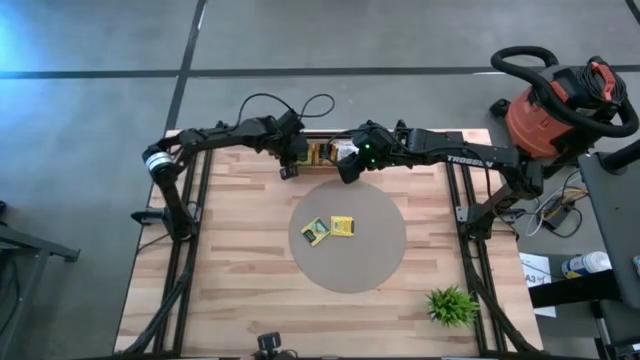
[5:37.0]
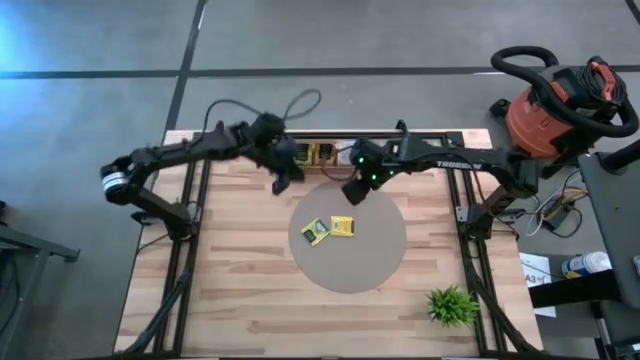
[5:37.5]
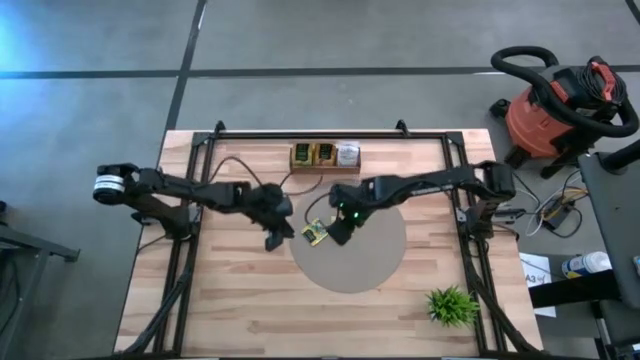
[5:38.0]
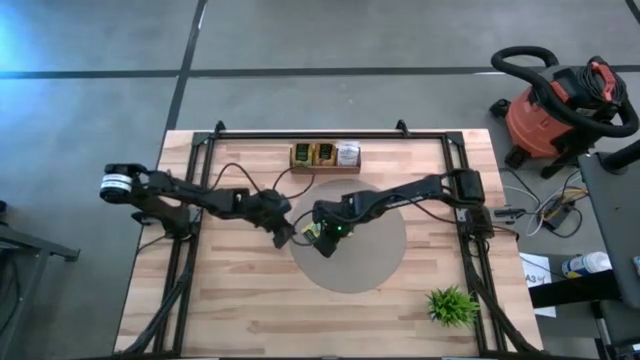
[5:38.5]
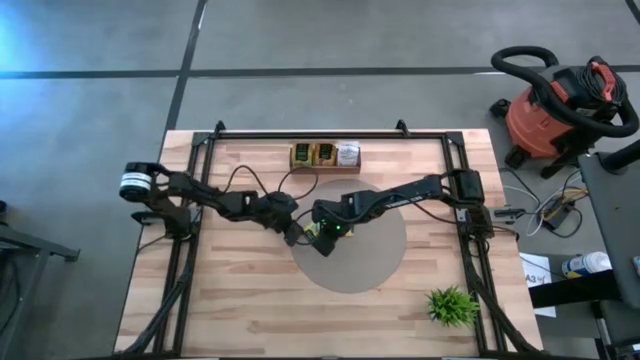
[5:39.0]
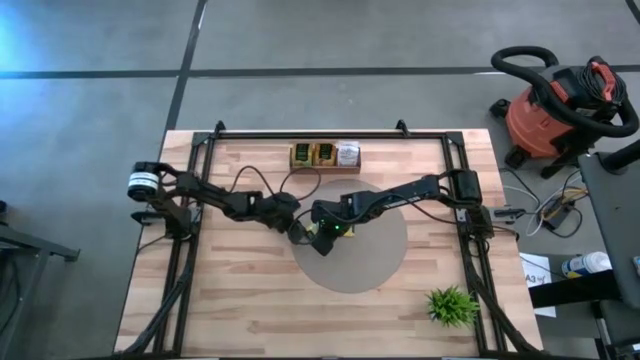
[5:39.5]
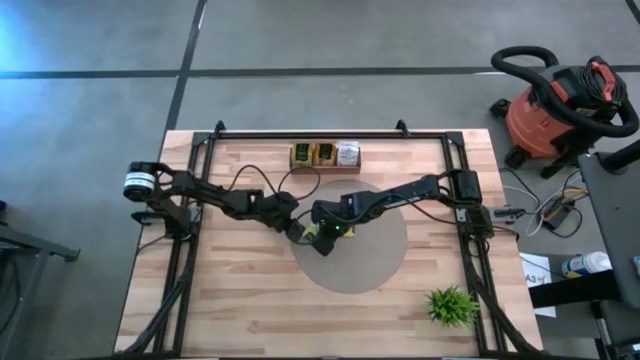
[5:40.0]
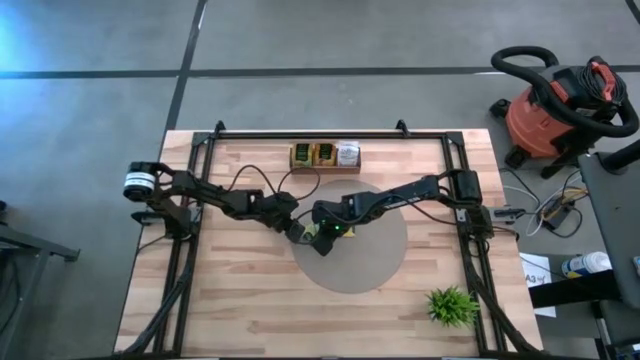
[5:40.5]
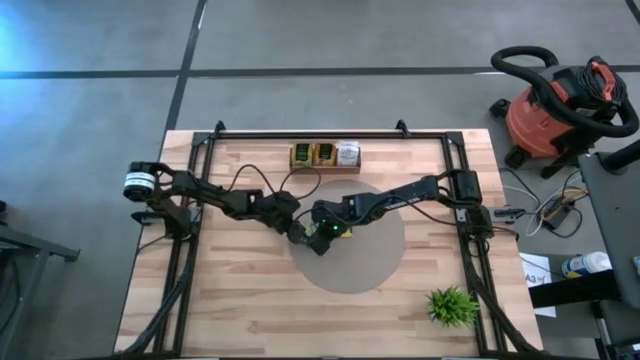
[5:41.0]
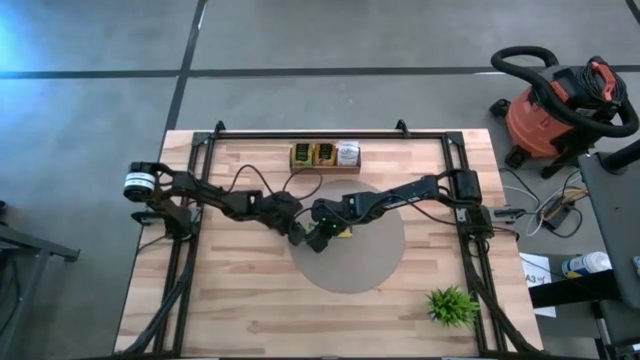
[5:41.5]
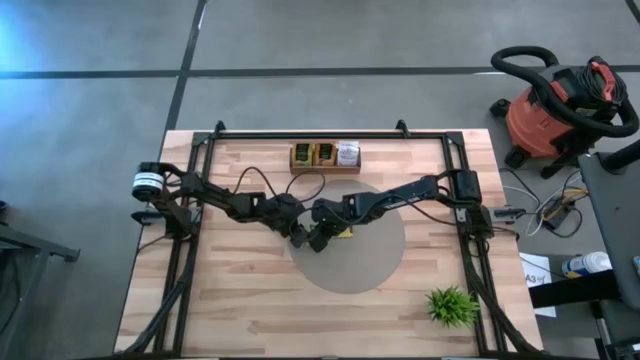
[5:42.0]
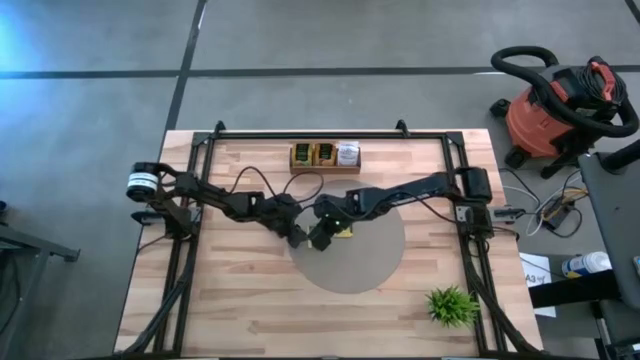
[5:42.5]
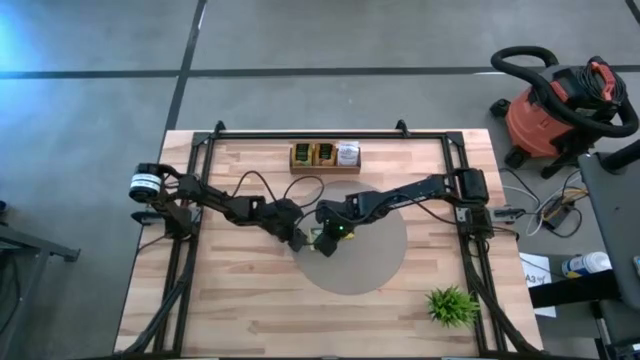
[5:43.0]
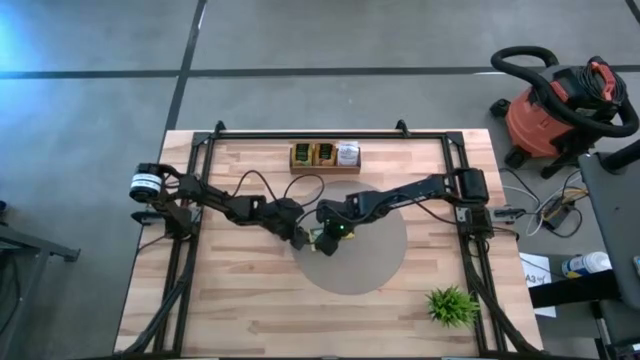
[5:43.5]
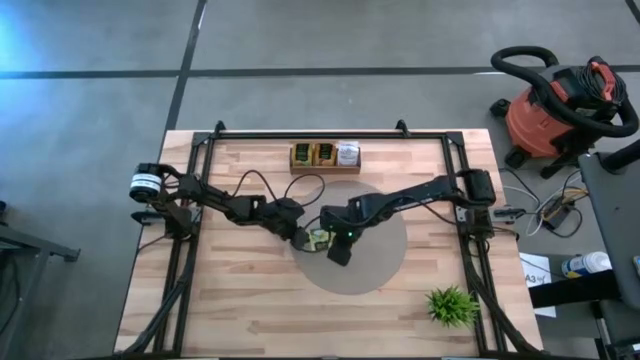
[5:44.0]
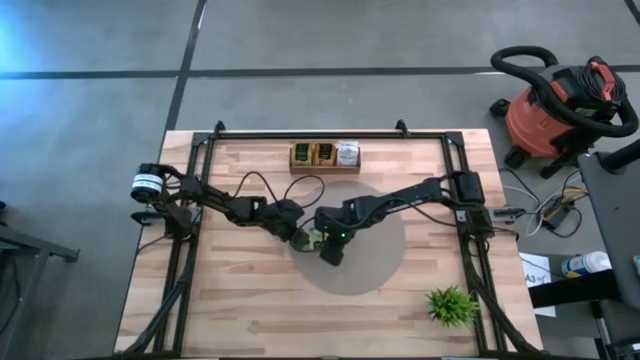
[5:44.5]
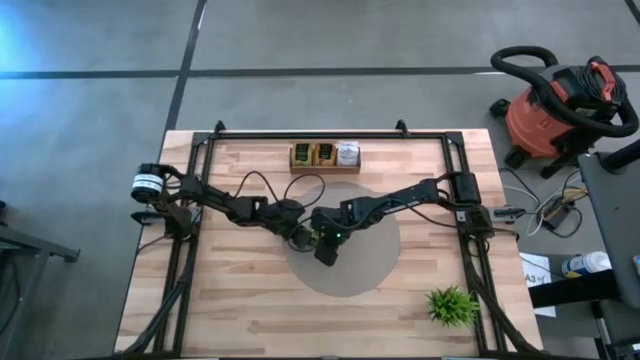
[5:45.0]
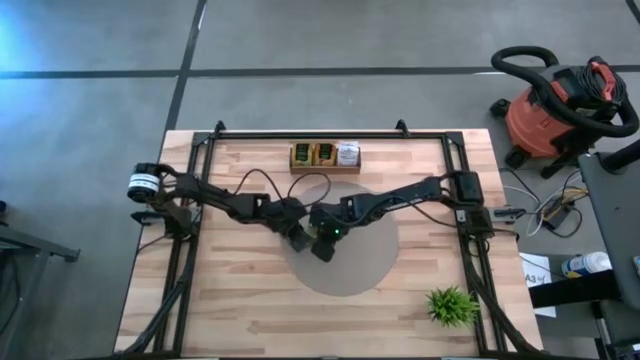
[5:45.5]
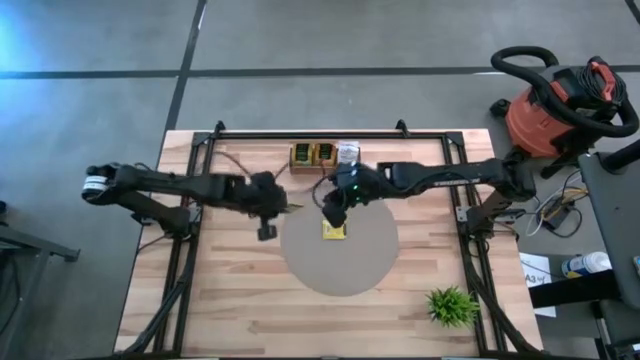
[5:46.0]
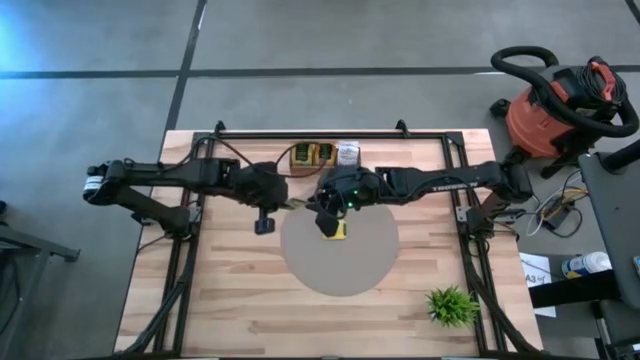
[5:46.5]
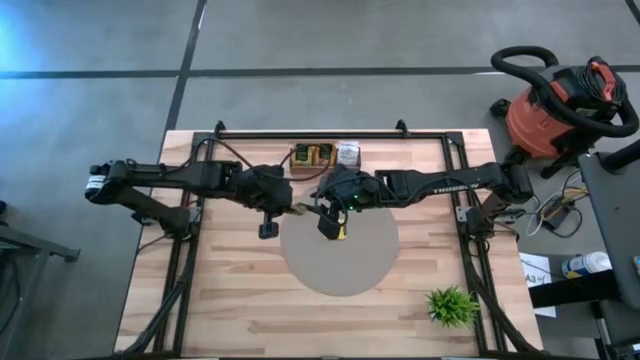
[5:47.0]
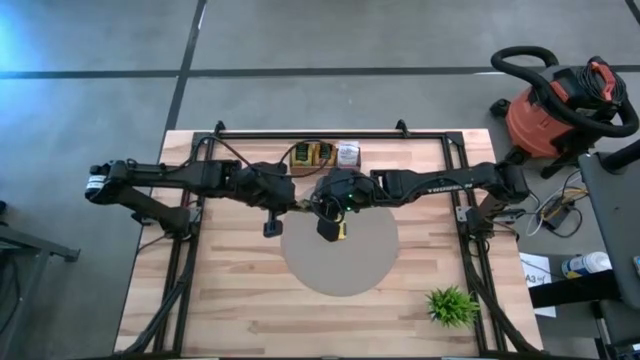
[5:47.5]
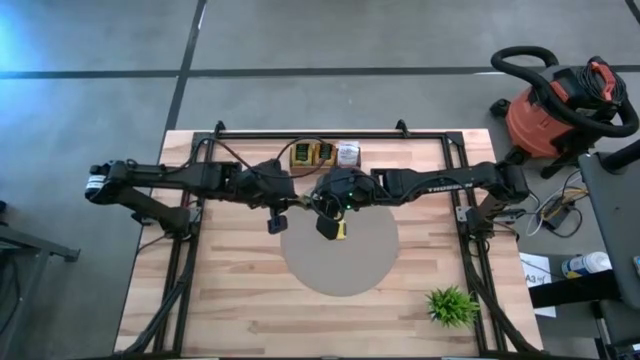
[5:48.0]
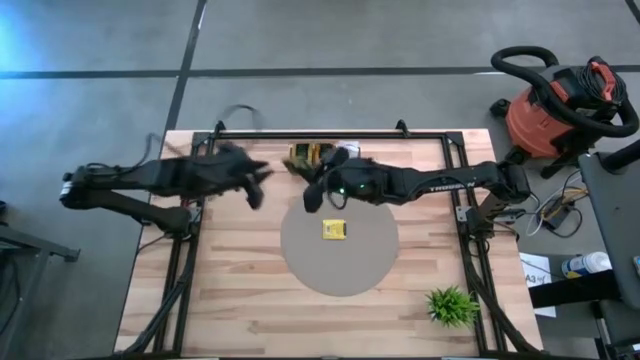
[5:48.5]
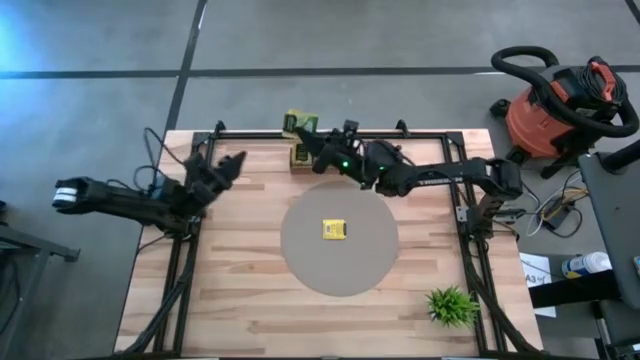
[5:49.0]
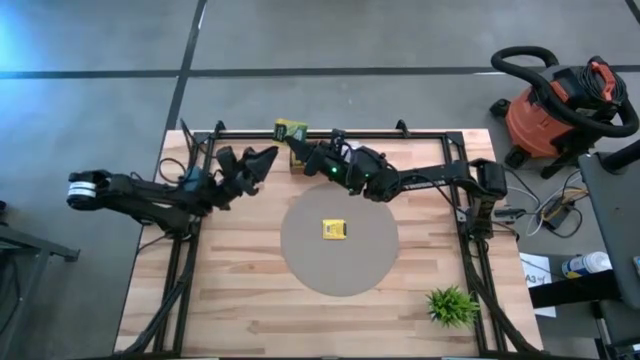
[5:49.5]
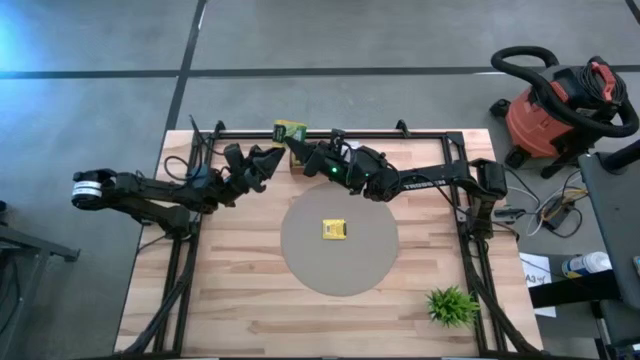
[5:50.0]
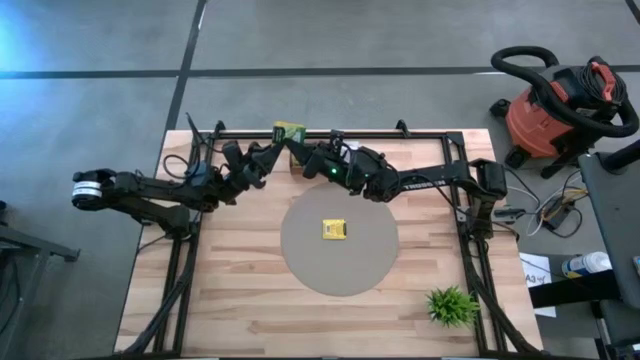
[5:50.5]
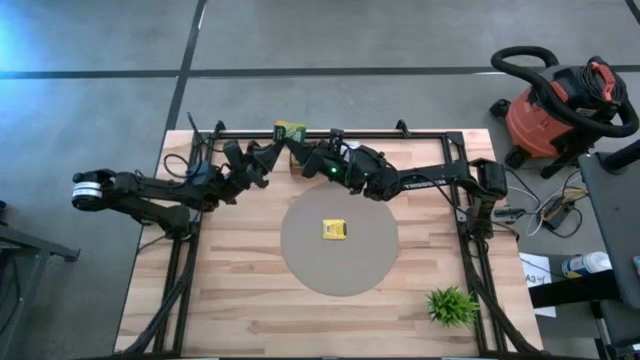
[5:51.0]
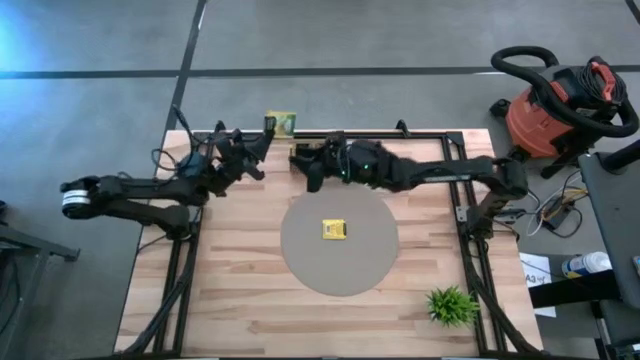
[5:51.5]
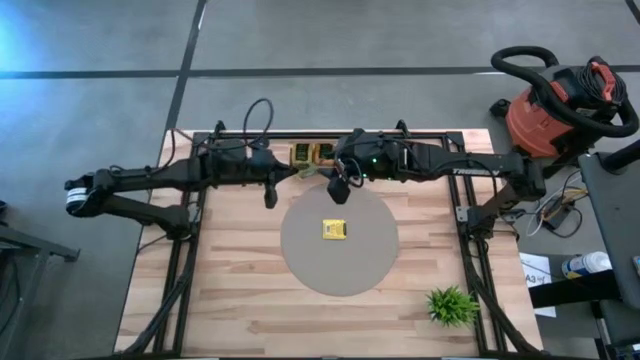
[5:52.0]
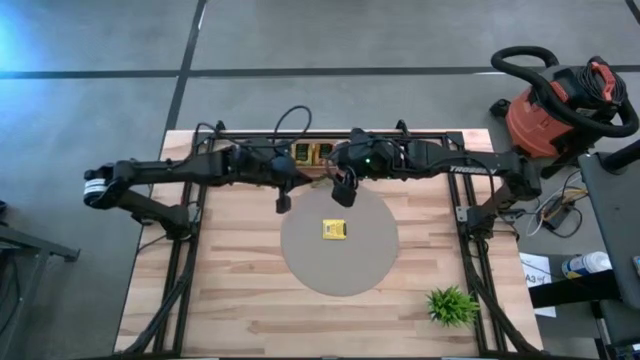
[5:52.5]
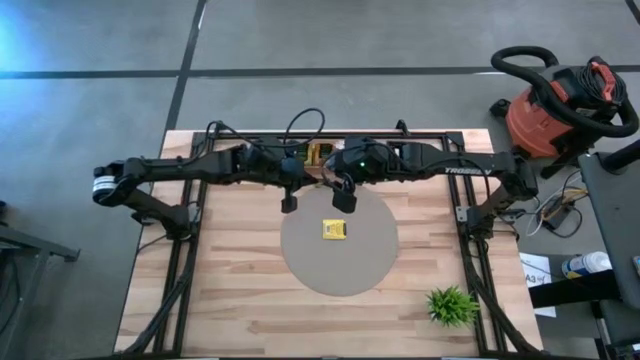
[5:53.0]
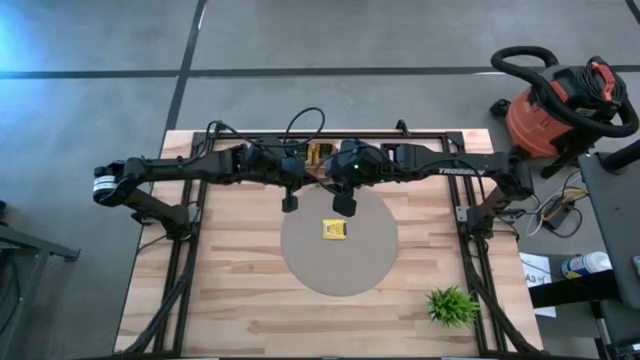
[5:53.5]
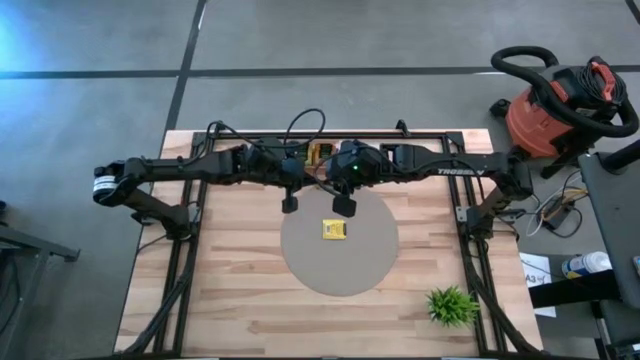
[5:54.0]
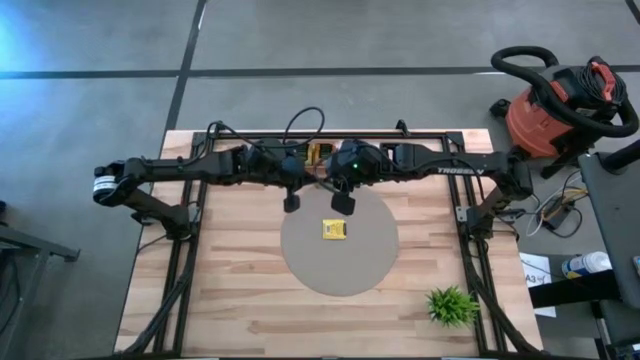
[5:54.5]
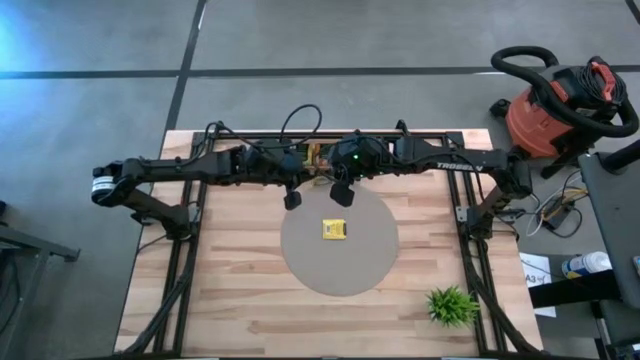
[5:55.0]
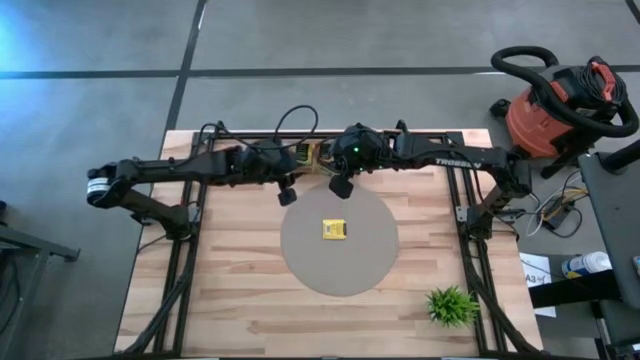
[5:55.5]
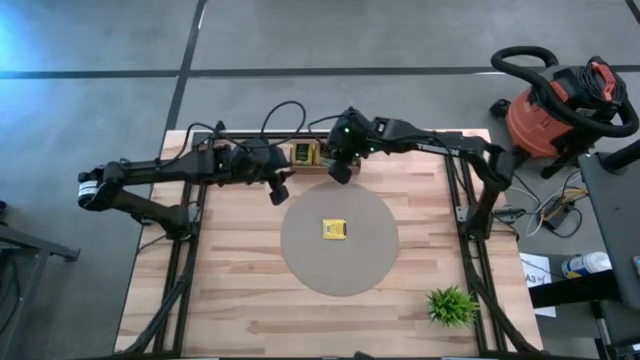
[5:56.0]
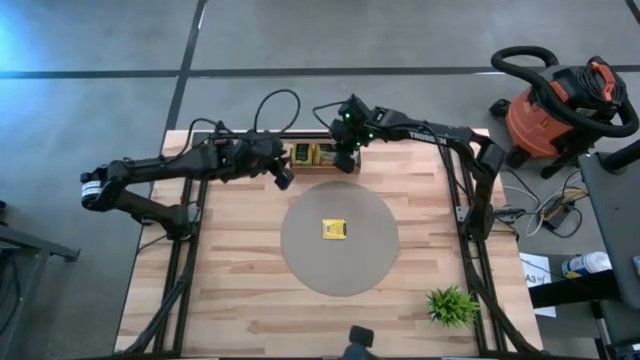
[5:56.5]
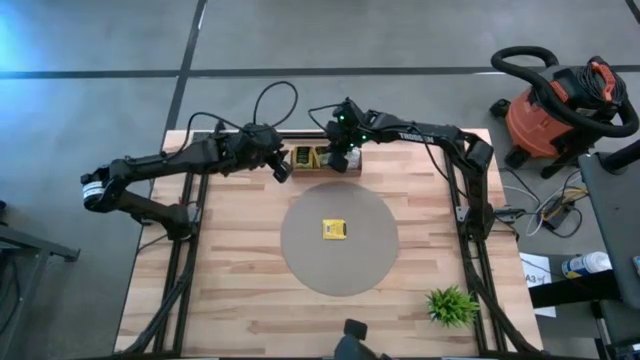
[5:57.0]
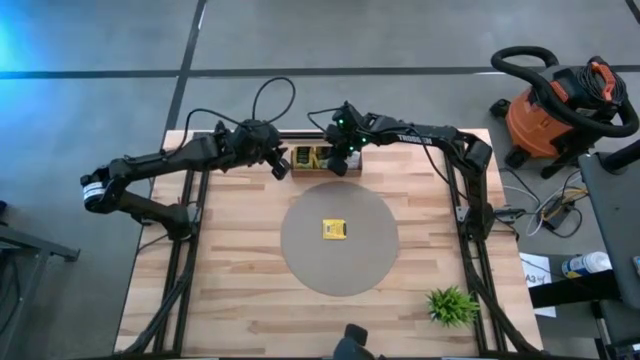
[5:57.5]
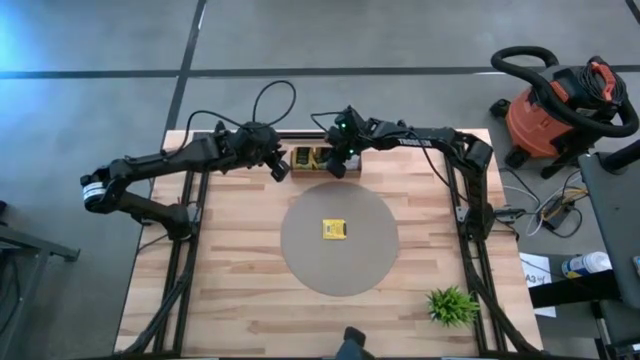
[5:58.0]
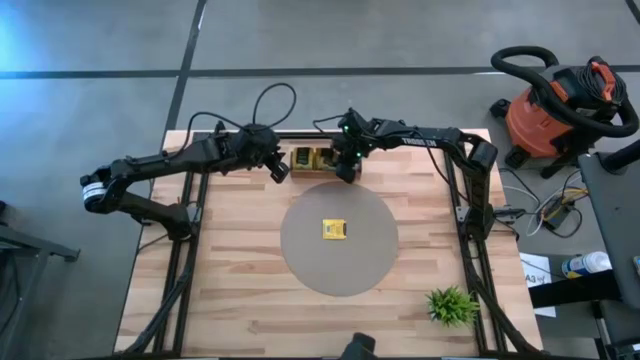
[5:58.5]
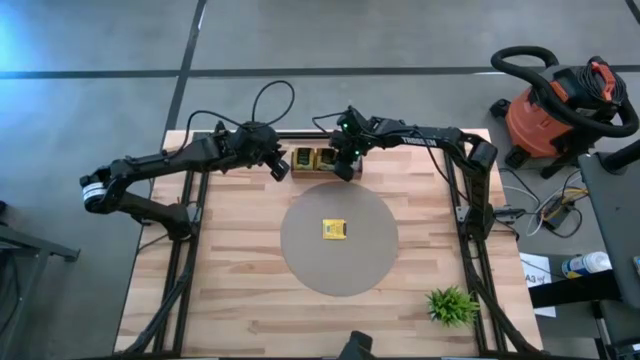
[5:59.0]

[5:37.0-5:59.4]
Task: Pick & Place Tea
Put the left yellow tea bag into the left compartment of the wooden organizer
